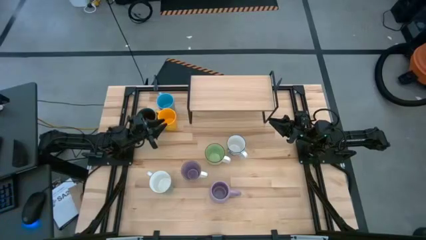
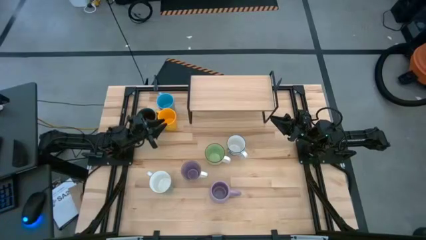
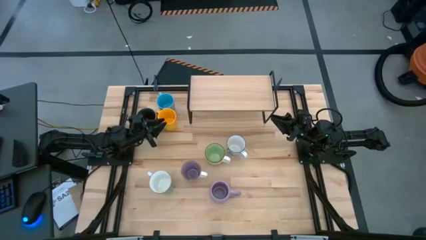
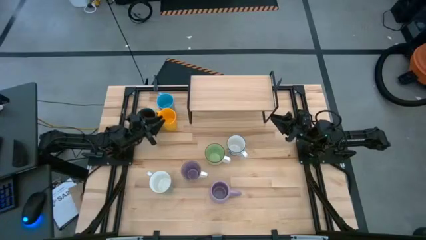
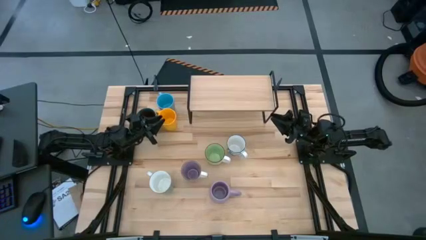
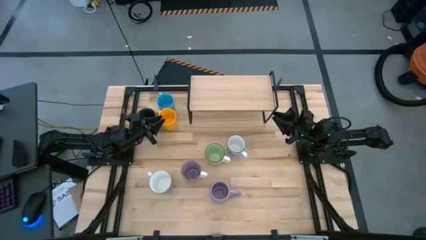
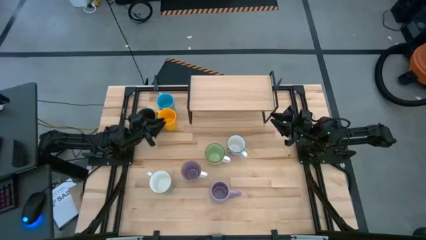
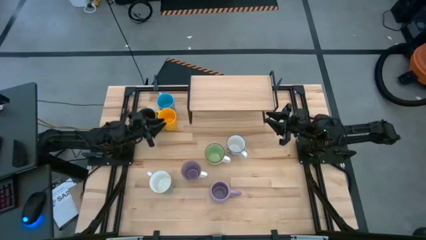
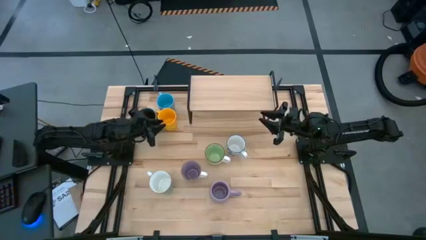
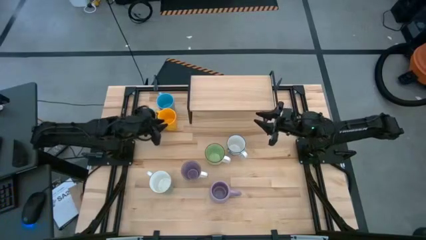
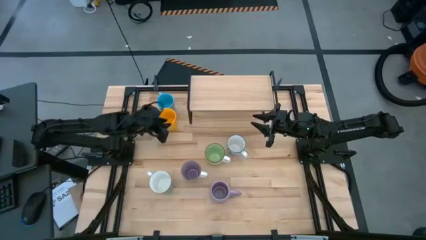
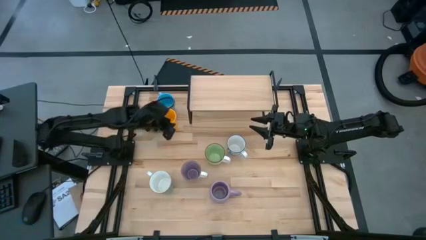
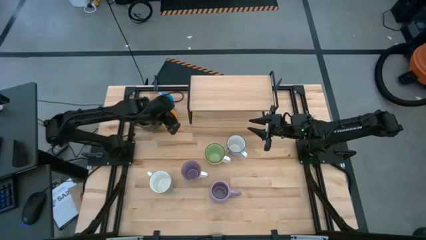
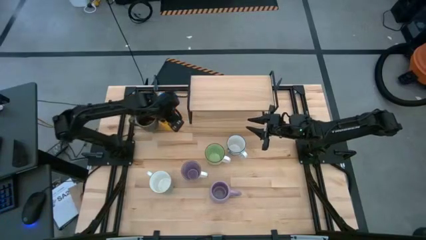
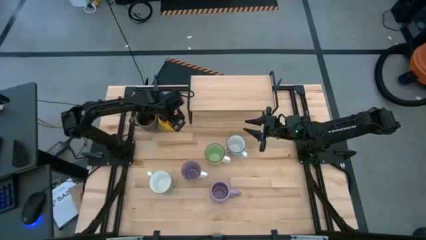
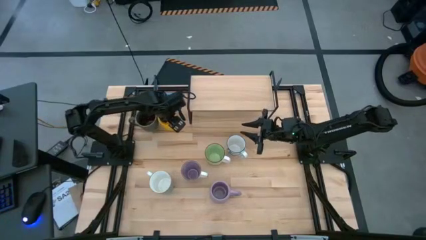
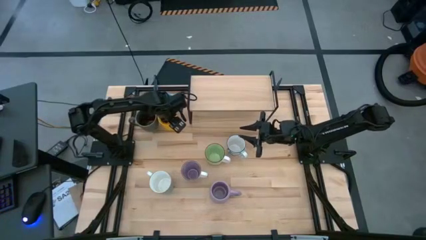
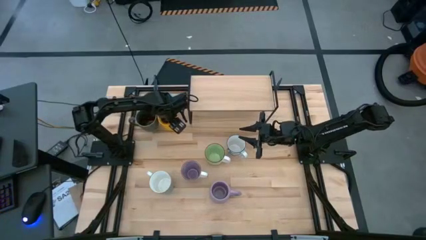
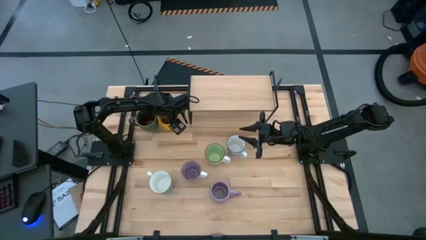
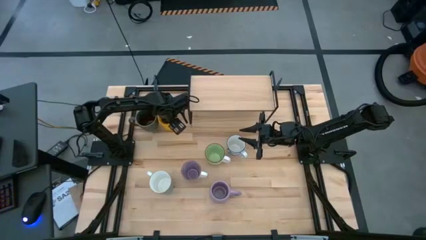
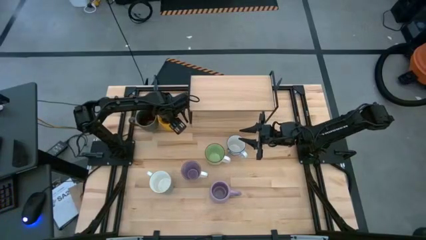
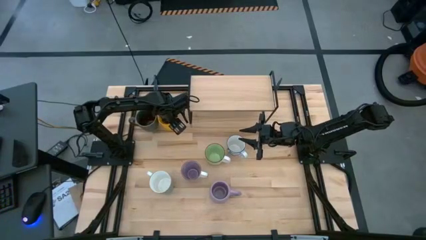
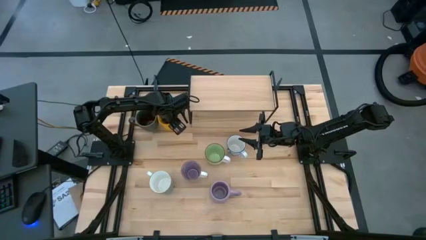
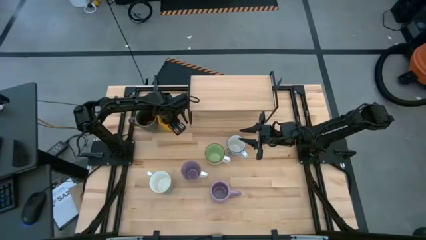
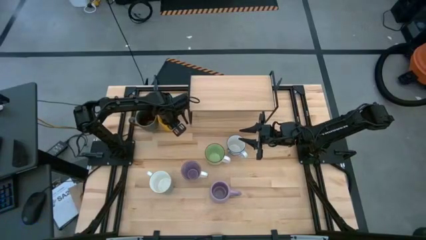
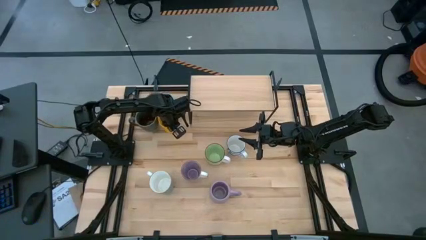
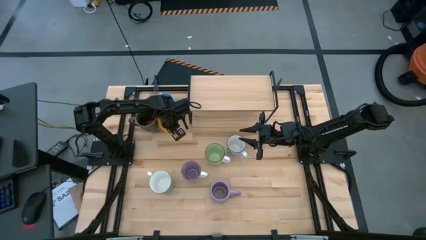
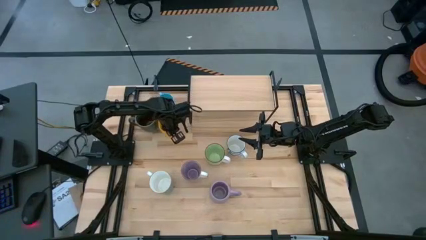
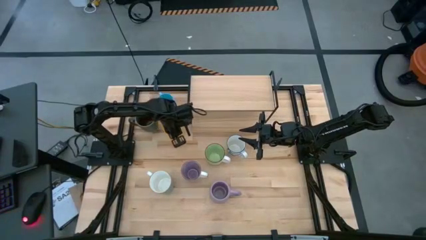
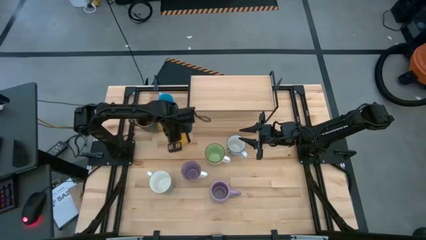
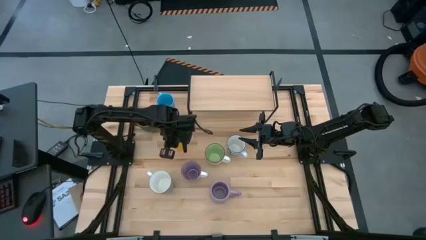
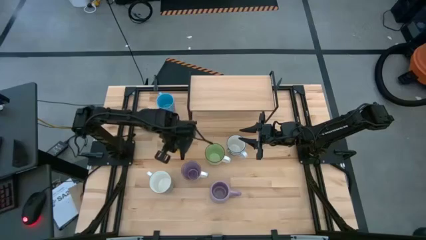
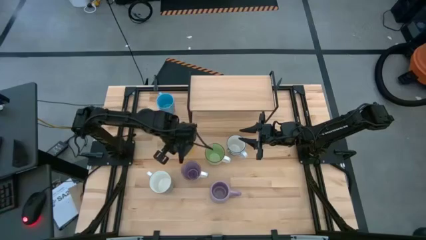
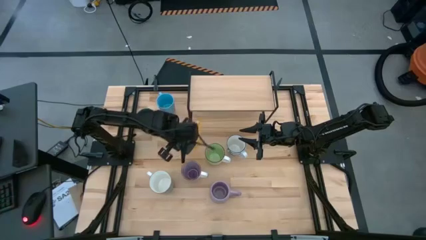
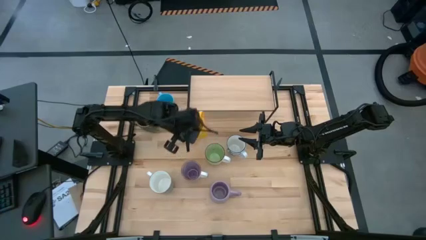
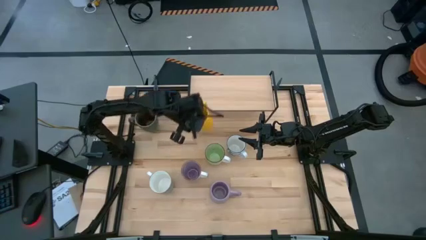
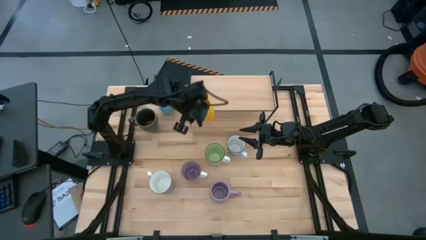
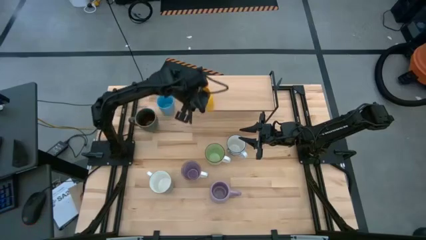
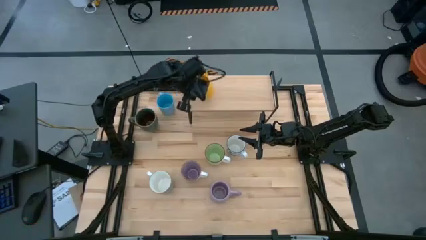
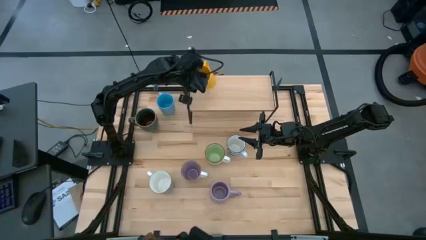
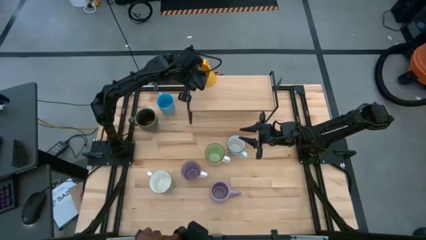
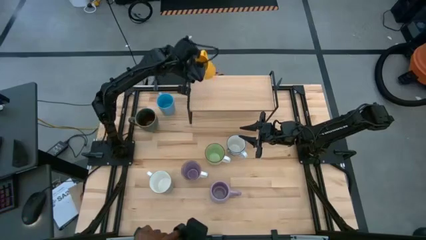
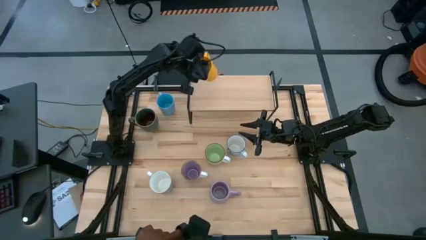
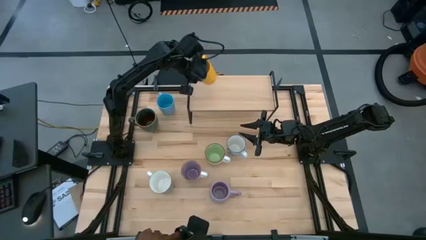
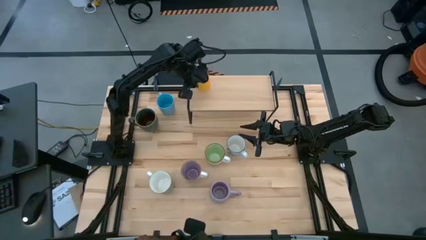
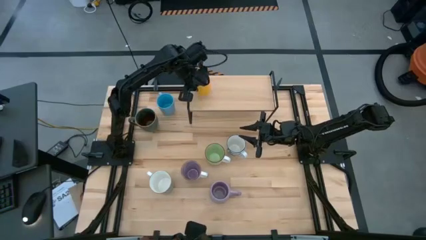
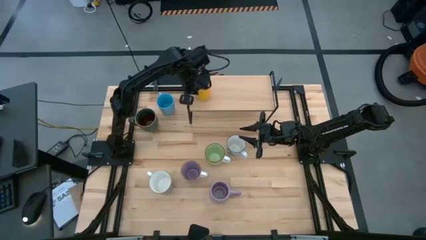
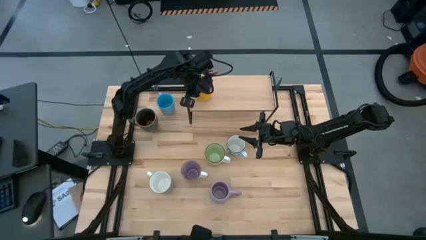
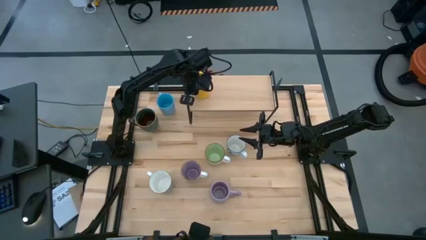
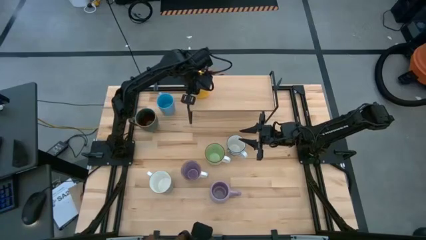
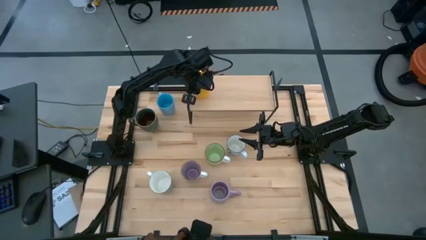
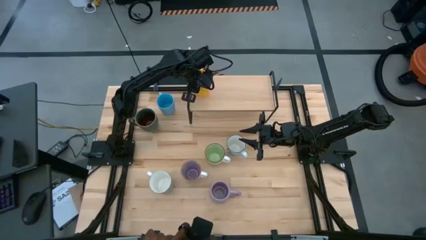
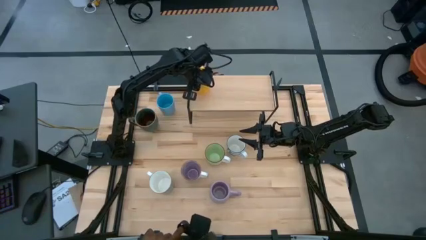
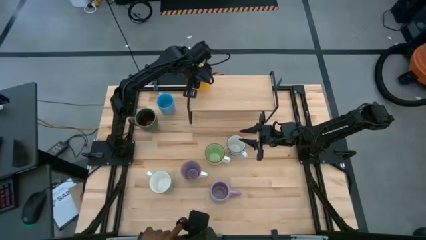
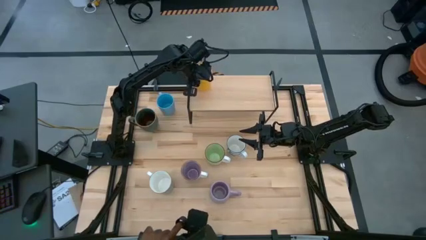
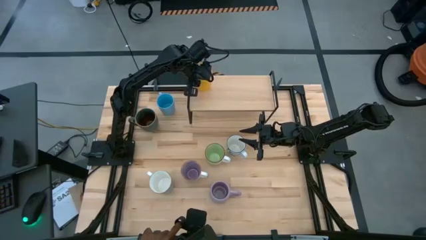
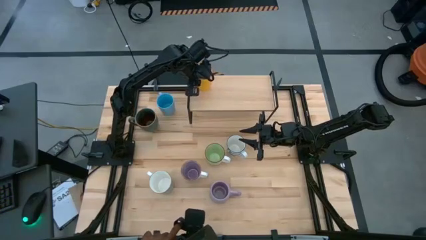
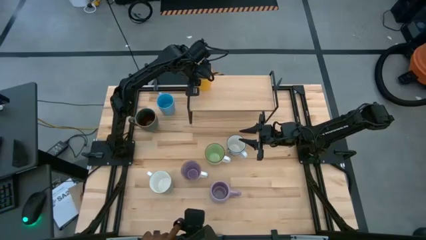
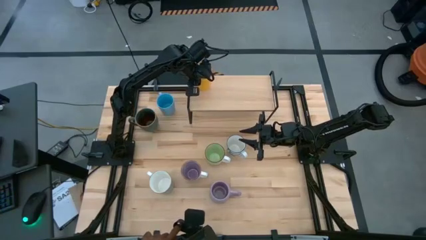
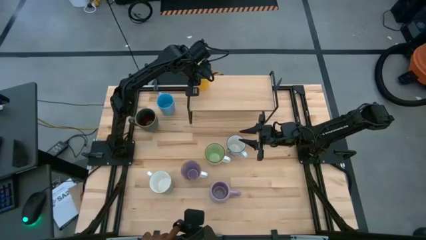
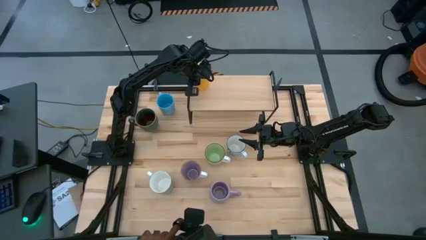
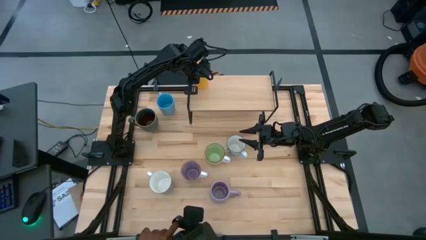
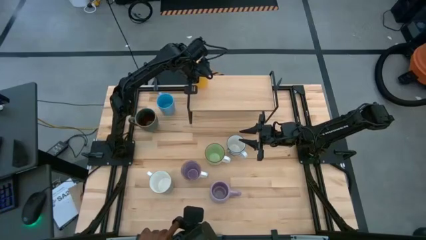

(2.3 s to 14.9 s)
Task: Place coffee mugs
Put the yellow mug on the shelf
